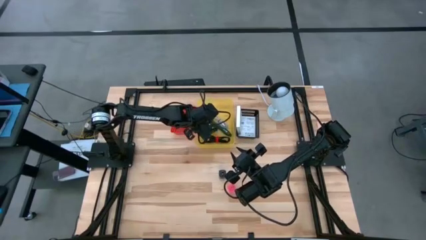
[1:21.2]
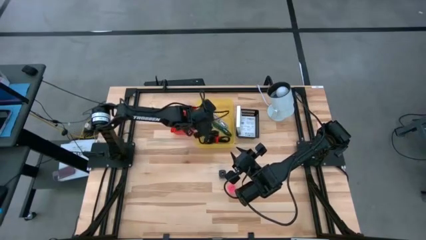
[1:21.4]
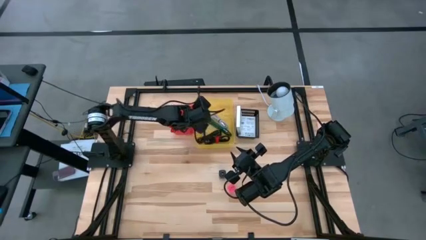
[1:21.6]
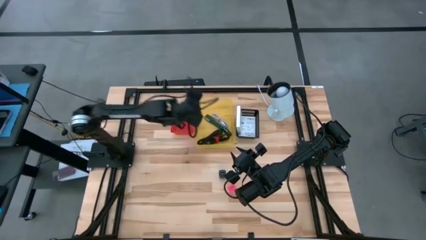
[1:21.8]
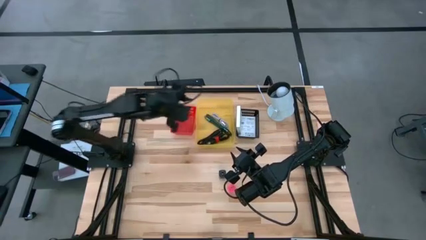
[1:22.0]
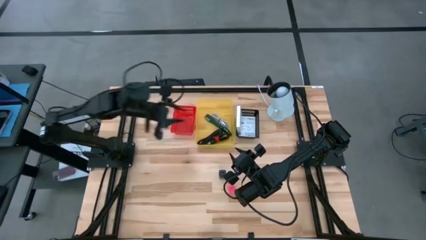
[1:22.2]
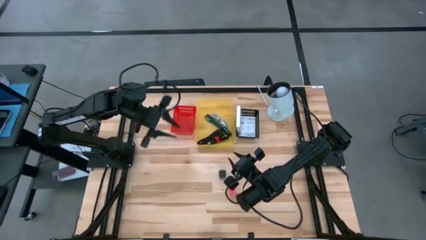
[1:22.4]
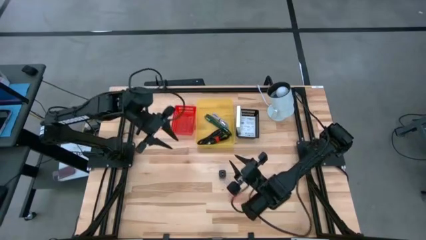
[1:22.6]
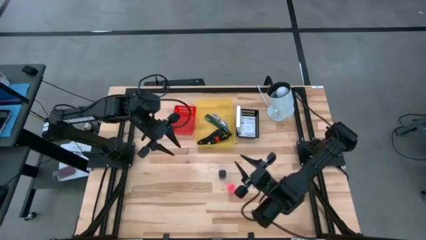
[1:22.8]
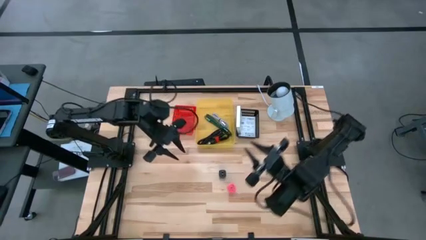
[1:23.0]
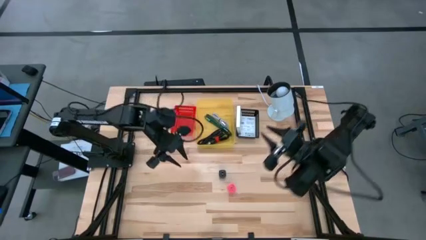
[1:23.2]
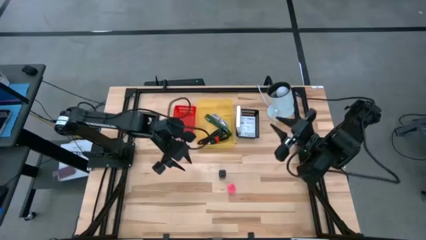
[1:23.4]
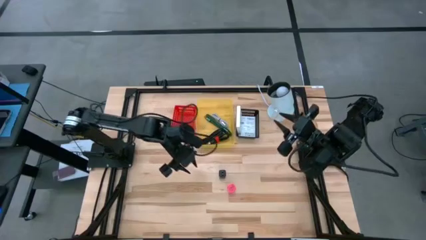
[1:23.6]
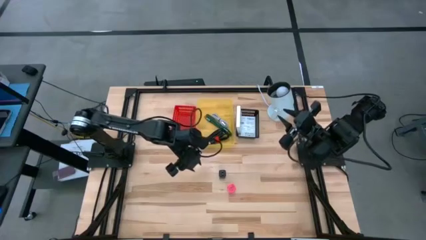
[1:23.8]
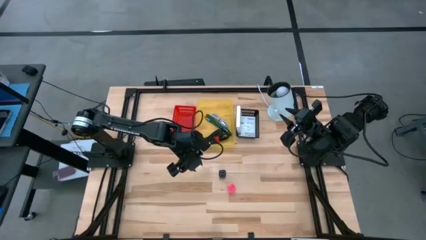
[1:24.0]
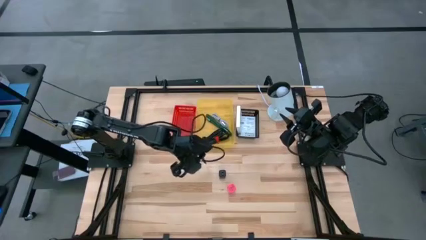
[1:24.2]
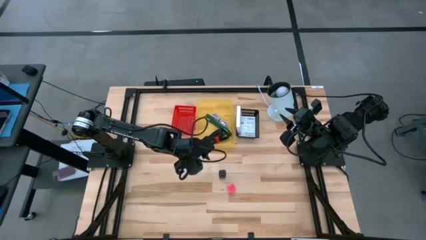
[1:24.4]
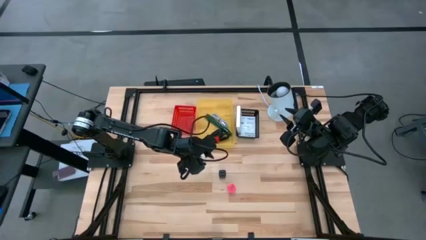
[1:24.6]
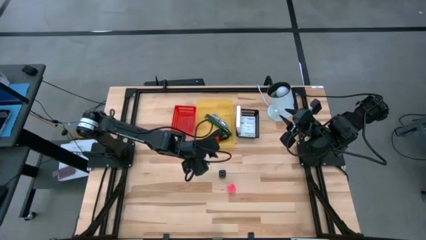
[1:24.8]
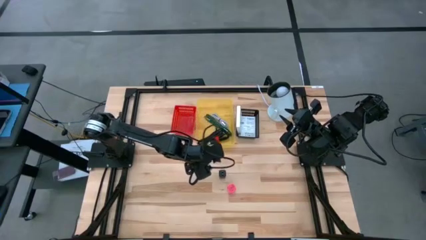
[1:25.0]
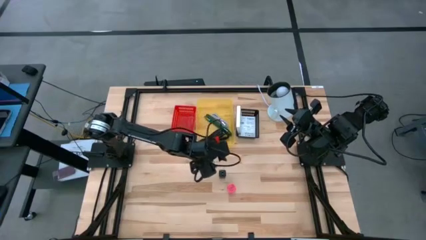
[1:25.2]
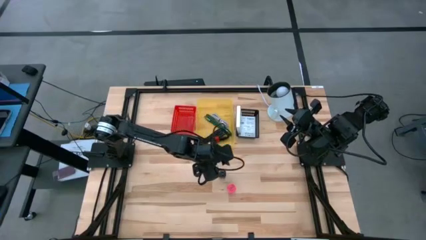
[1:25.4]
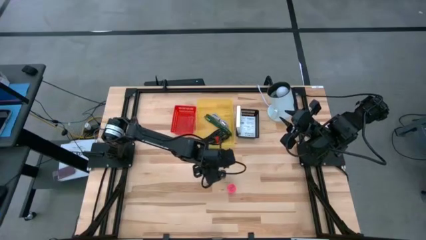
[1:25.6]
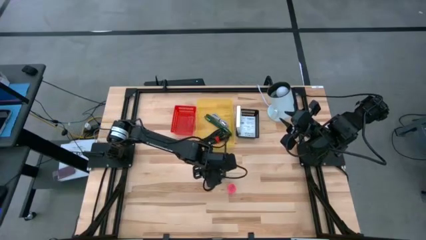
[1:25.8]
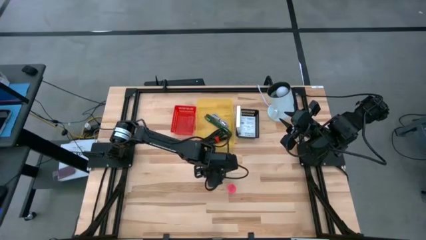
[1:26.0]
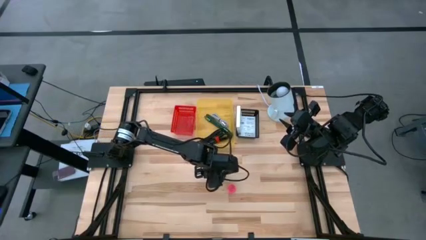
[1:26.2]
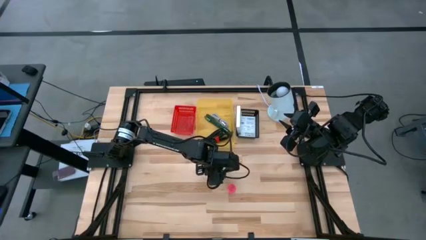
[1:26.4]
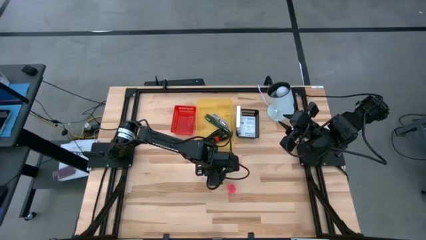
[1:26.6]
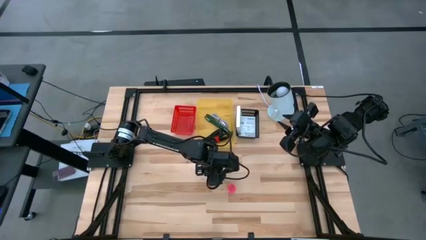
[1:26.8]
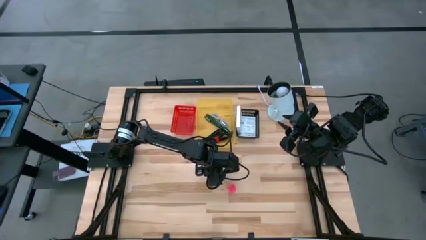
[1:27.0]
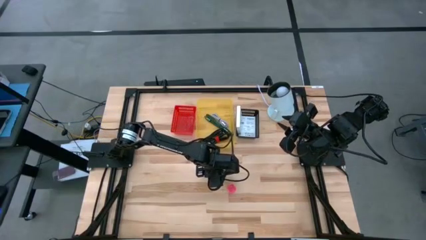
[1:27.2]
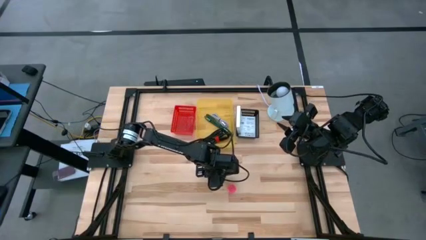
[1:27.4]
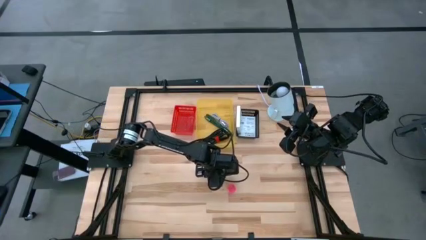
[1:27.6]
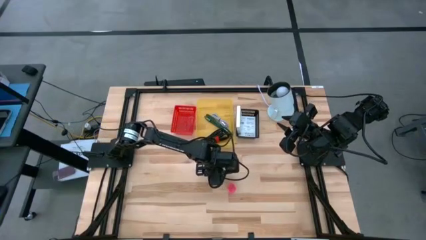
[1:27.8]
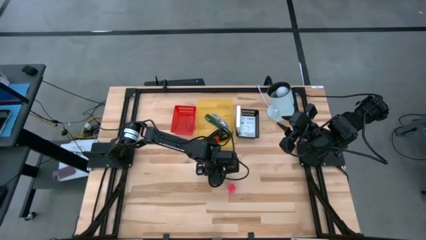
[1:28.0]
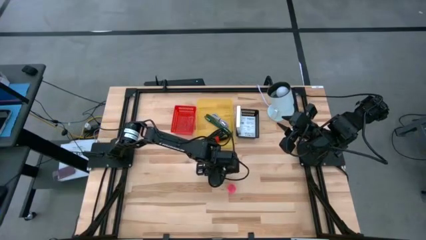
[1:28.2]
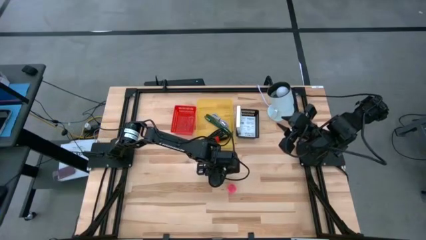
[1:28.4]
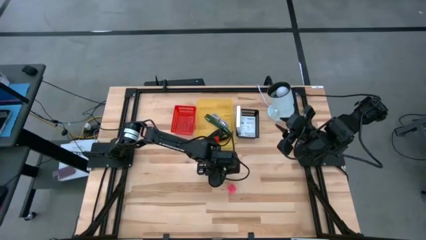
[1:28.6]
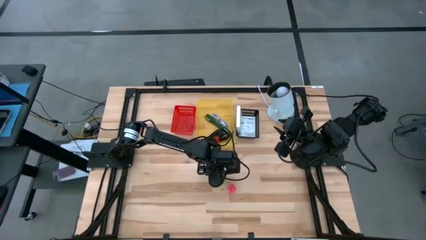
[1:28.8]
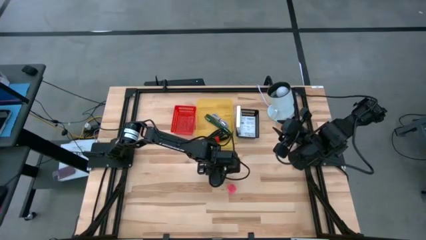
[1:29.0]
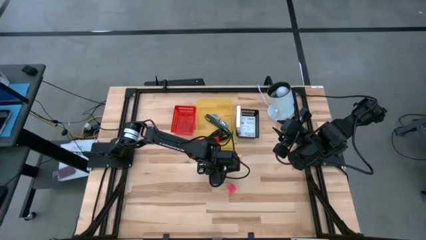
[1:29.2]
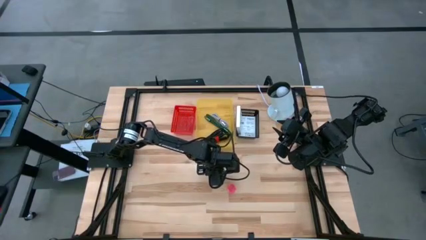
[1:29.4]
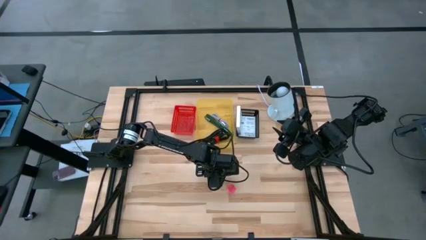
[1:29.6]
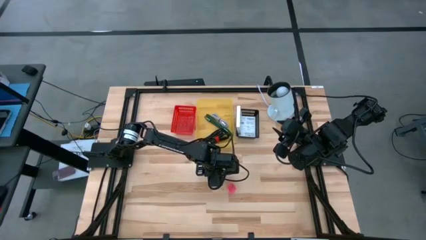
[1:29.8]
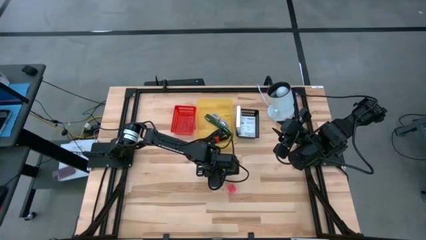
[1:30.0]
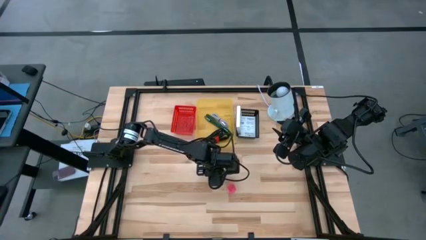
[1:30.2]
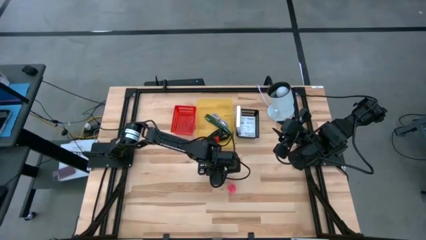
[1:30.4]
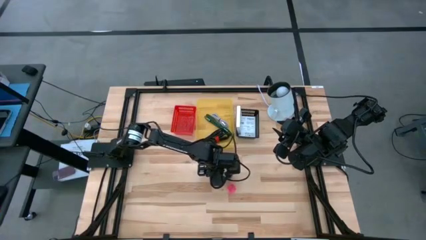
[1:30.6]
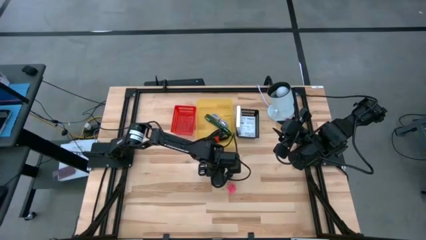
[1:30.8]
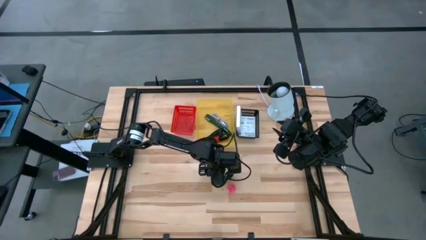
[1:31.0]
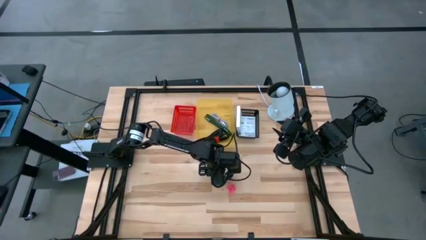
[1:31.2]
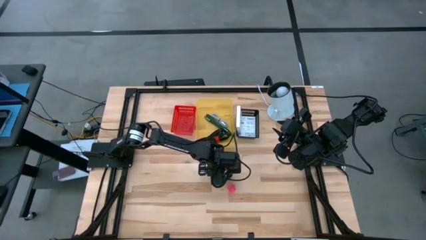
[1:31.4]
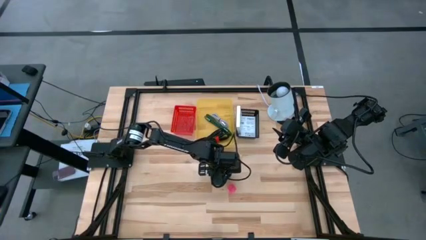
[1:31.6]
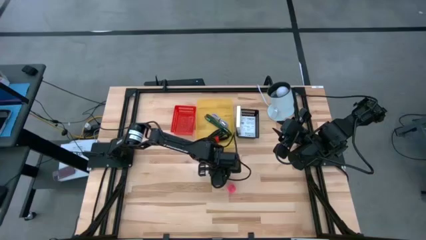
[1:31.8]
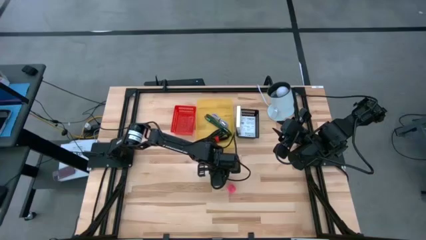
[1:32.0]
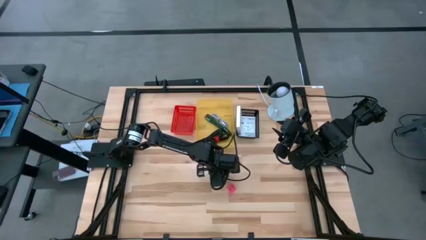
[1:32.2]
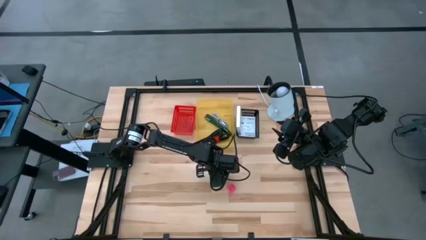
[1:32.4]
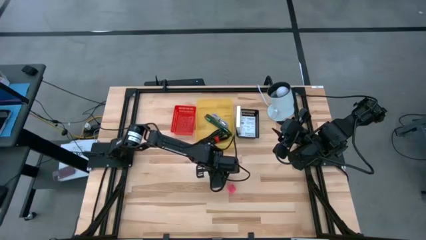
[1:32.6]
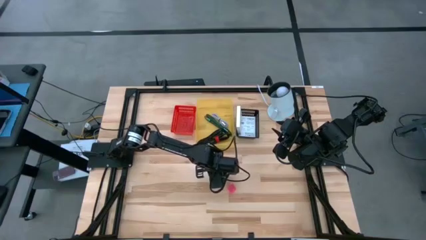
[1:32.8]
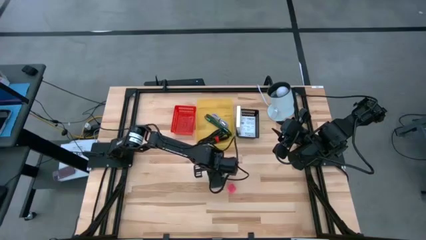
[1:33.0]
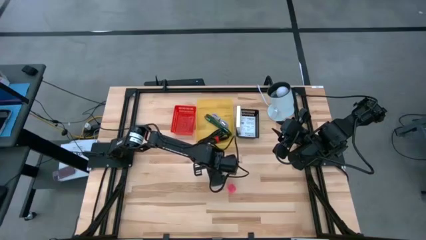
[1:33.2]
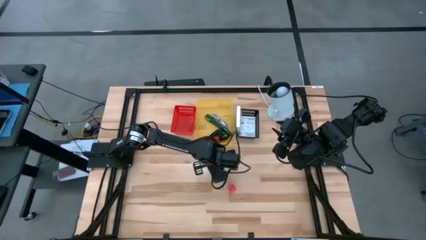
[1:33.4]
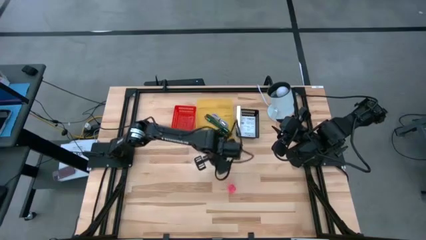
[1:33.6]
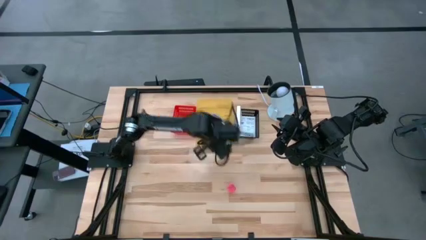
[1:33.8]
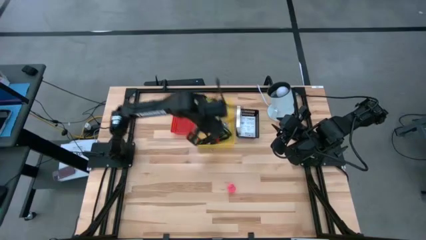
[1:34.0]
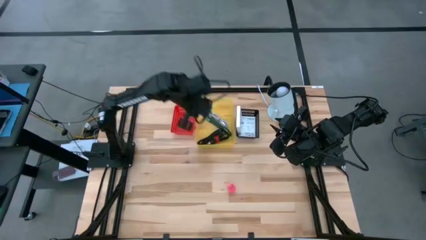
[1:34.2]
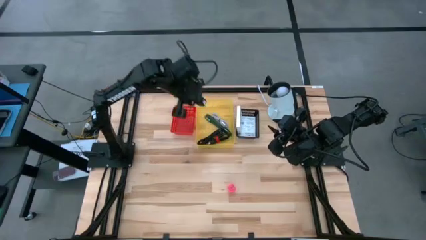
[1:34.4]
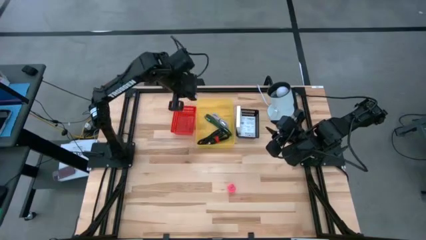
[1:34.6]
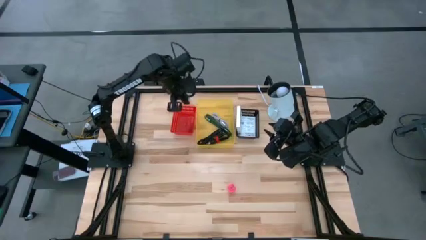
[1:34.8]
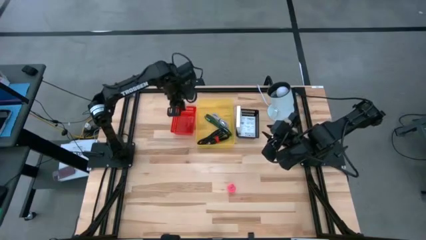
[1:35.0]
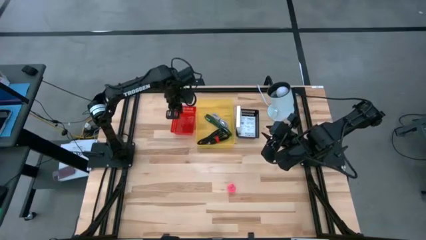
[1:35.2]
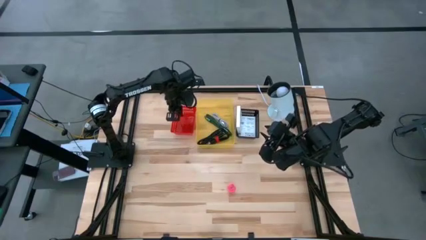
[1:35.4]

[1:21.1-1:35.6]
Task: Pick and place items into bin
Put the black charger adapter into the red bin
